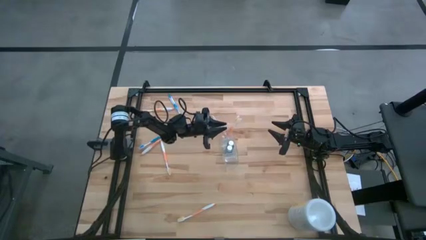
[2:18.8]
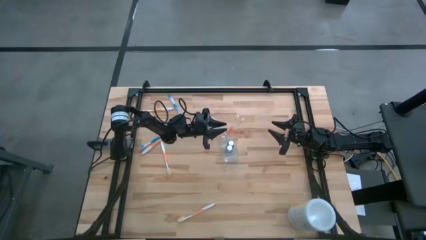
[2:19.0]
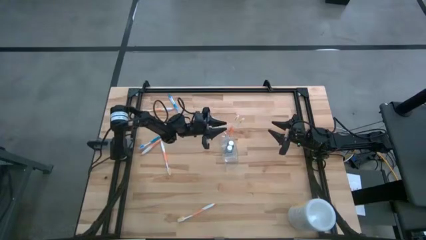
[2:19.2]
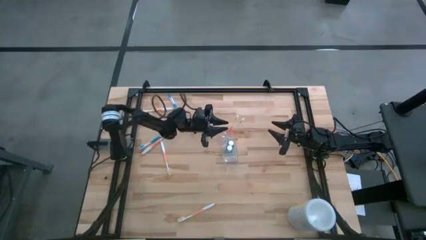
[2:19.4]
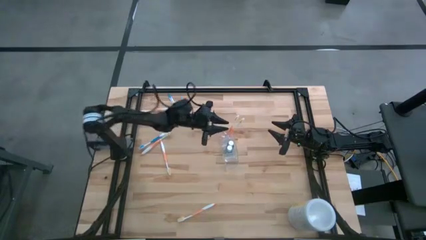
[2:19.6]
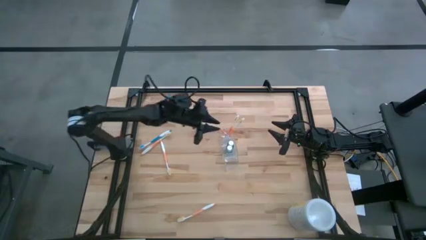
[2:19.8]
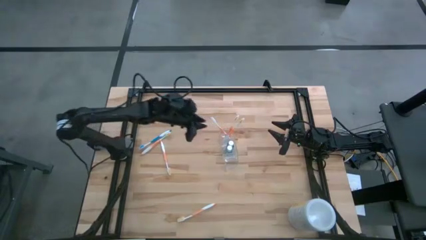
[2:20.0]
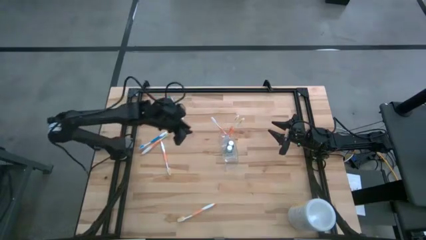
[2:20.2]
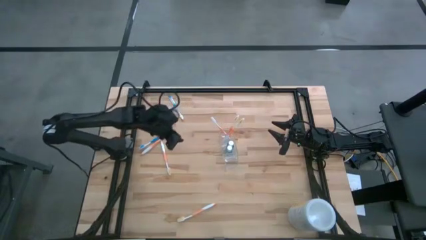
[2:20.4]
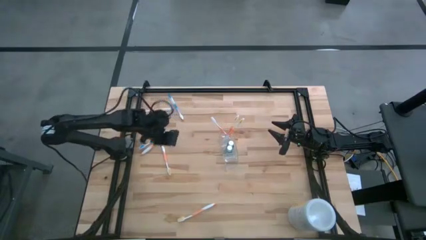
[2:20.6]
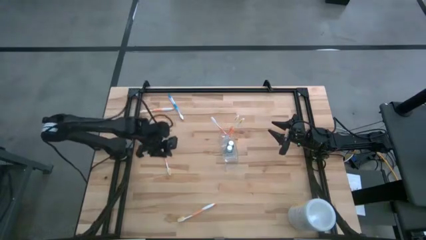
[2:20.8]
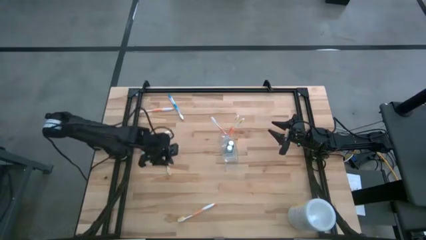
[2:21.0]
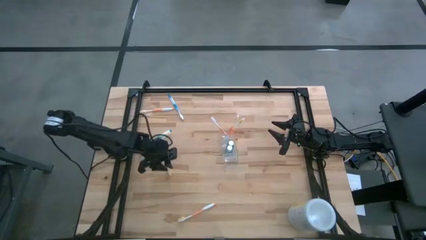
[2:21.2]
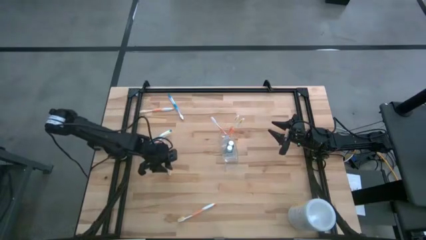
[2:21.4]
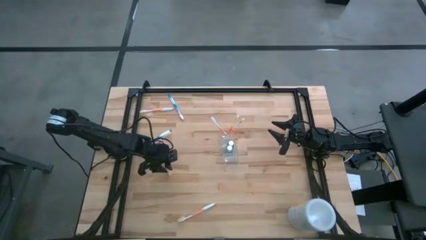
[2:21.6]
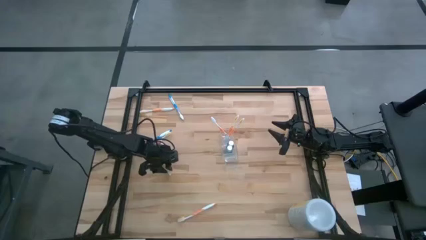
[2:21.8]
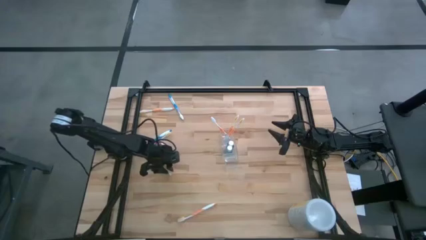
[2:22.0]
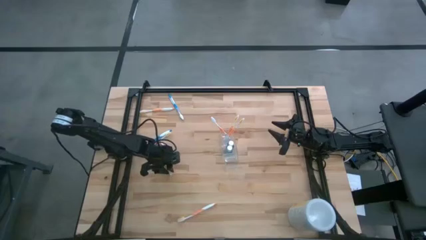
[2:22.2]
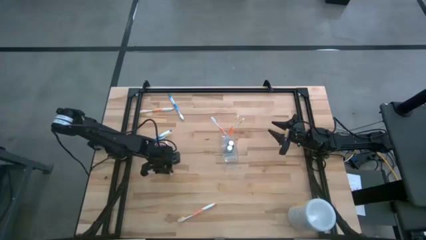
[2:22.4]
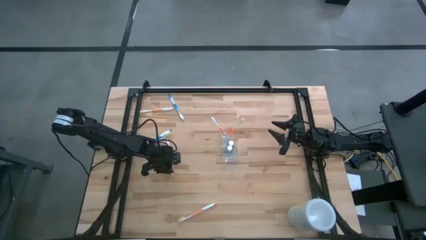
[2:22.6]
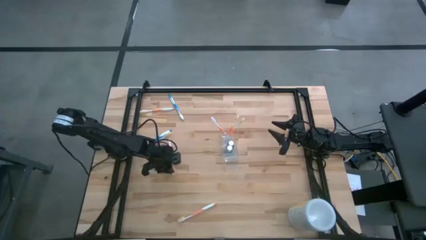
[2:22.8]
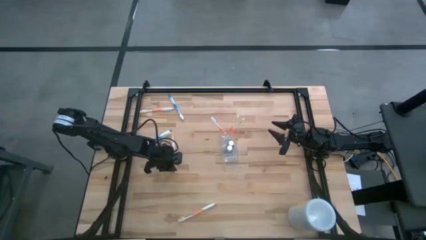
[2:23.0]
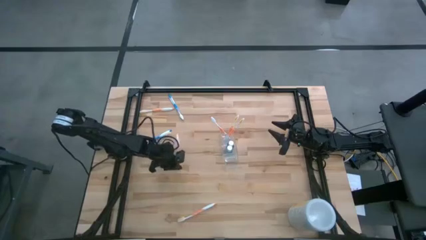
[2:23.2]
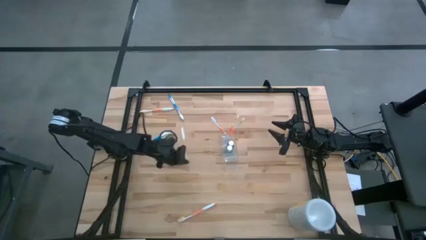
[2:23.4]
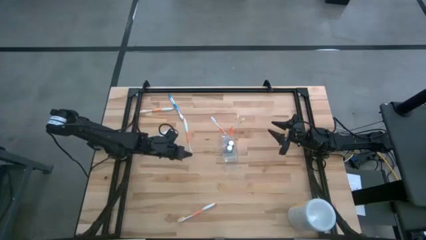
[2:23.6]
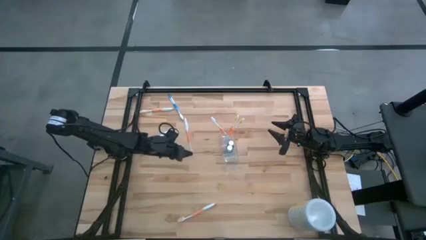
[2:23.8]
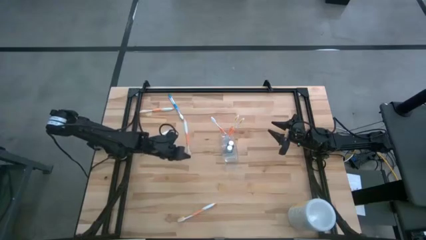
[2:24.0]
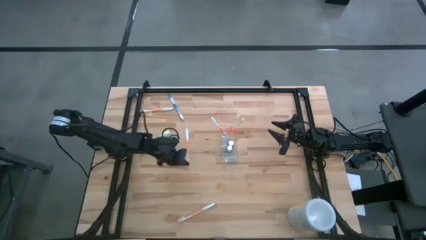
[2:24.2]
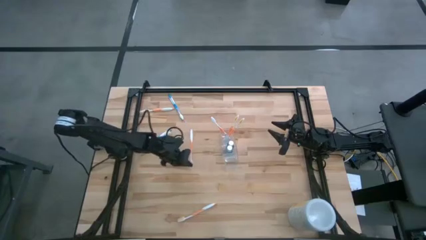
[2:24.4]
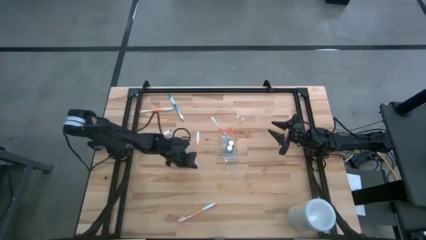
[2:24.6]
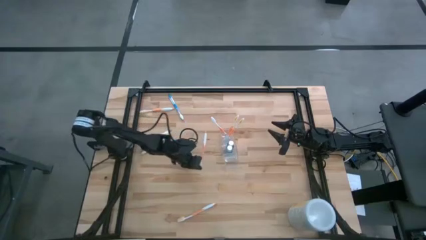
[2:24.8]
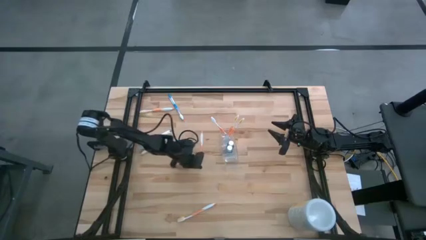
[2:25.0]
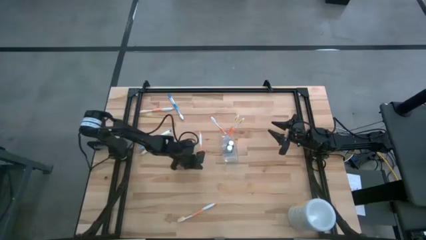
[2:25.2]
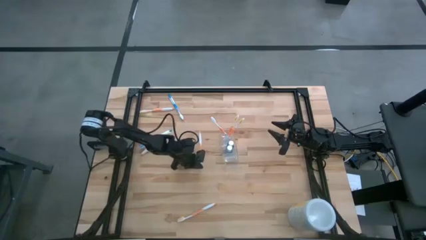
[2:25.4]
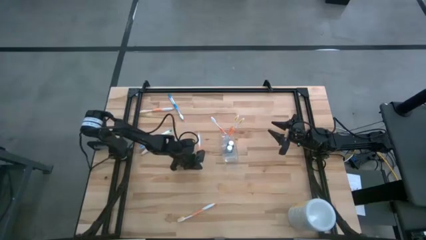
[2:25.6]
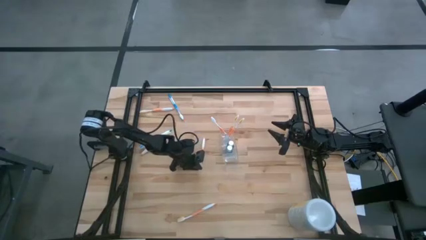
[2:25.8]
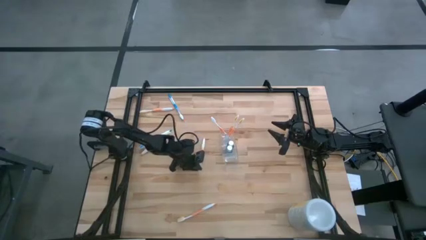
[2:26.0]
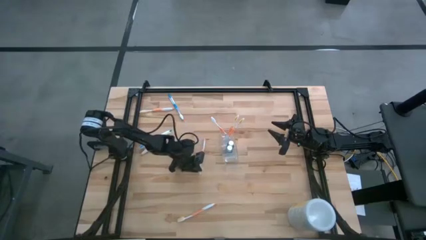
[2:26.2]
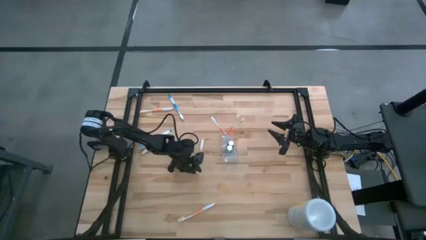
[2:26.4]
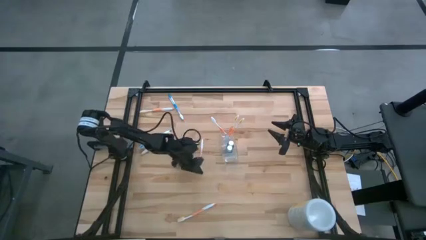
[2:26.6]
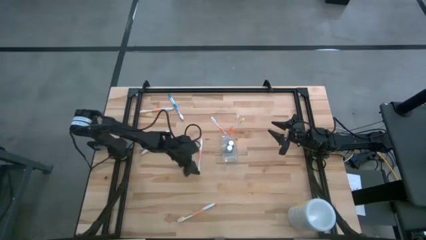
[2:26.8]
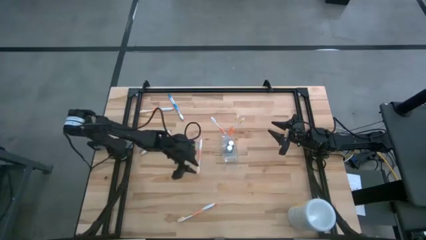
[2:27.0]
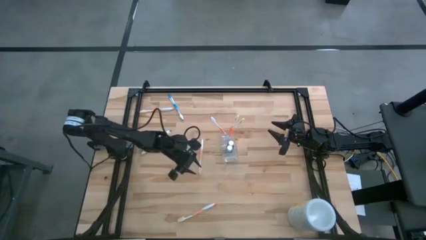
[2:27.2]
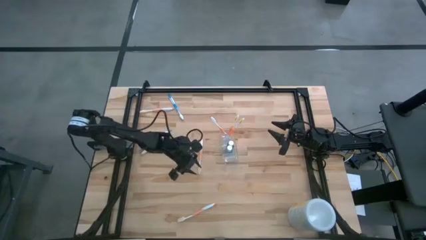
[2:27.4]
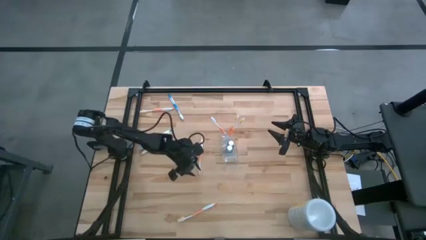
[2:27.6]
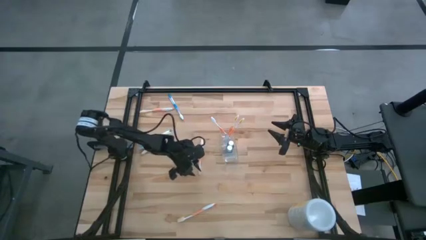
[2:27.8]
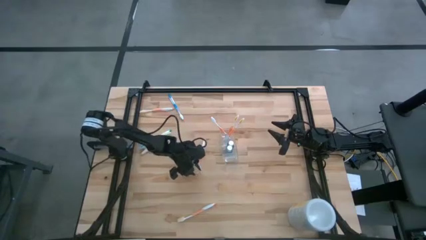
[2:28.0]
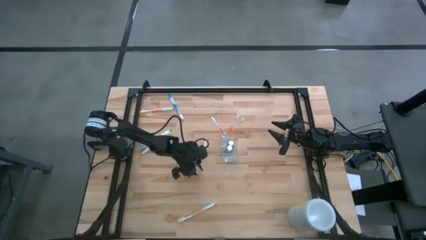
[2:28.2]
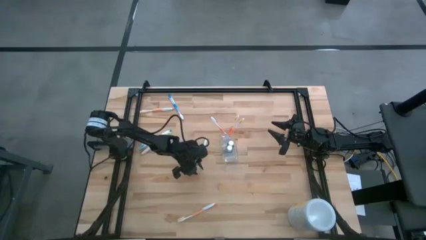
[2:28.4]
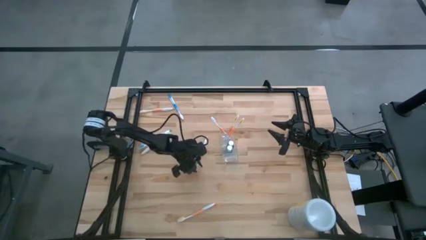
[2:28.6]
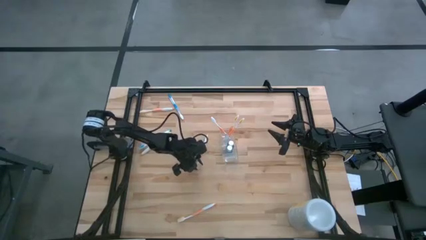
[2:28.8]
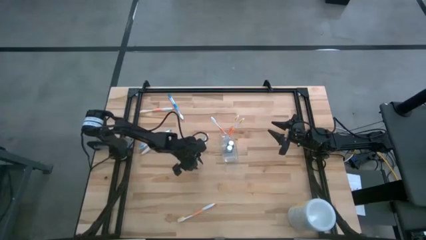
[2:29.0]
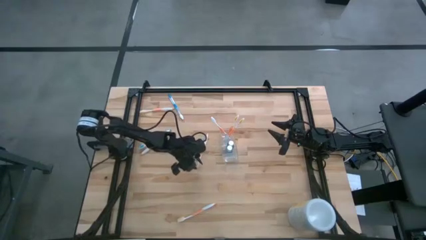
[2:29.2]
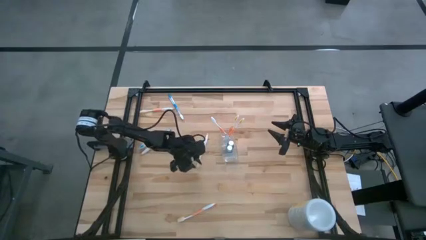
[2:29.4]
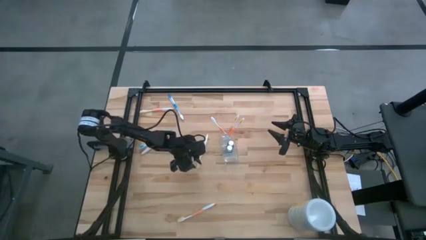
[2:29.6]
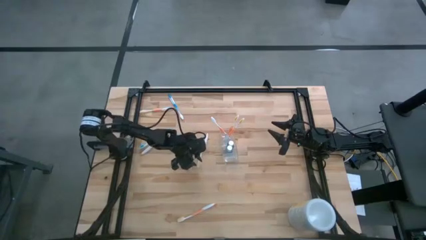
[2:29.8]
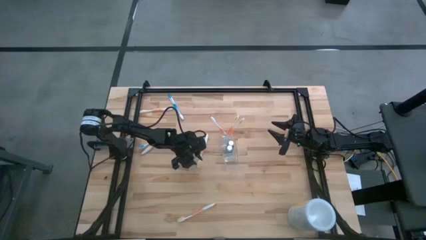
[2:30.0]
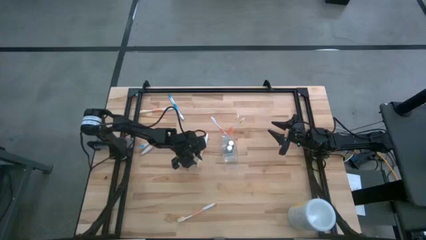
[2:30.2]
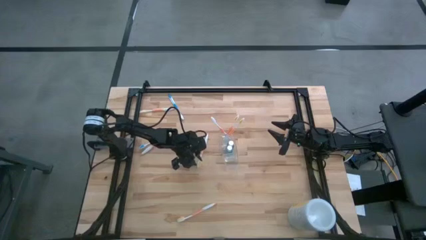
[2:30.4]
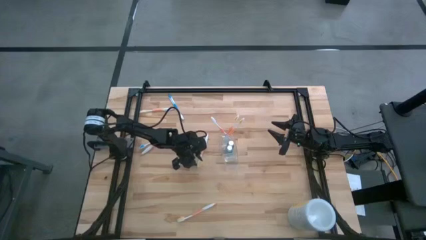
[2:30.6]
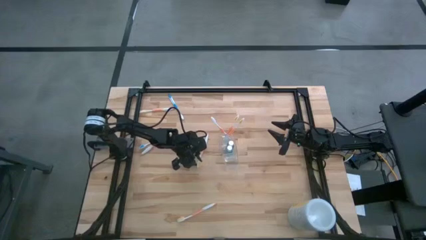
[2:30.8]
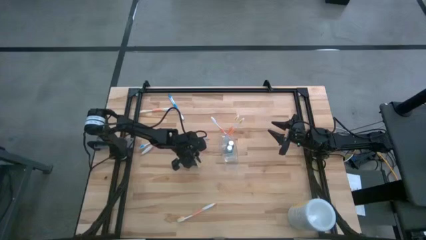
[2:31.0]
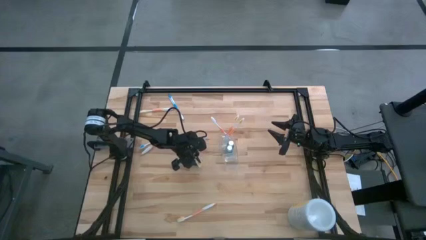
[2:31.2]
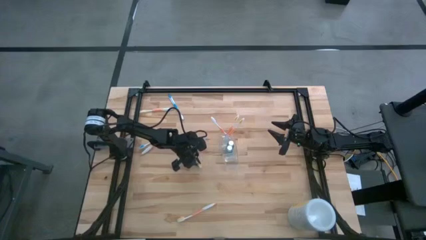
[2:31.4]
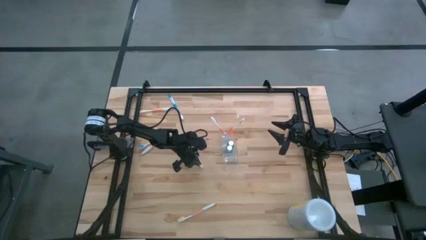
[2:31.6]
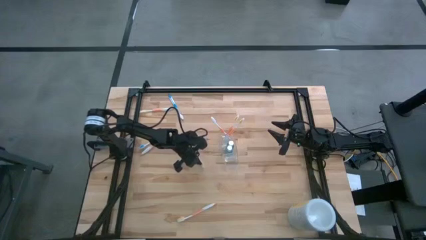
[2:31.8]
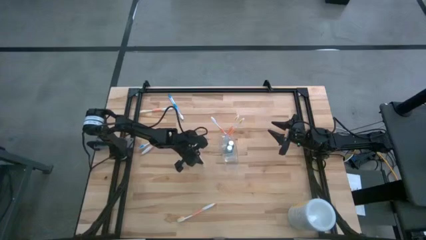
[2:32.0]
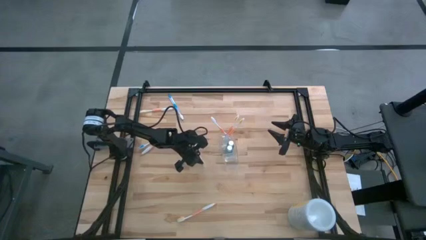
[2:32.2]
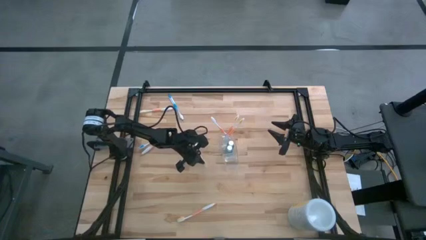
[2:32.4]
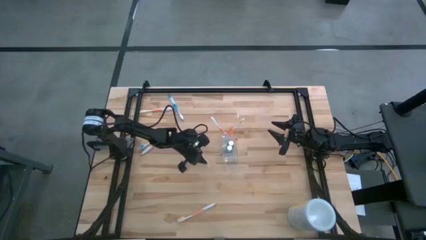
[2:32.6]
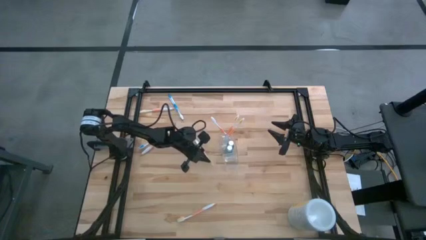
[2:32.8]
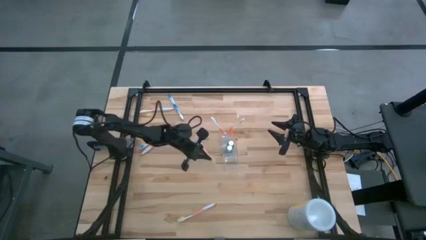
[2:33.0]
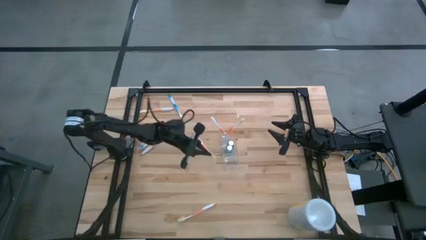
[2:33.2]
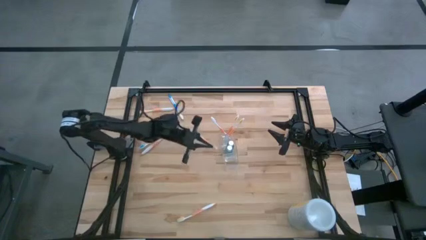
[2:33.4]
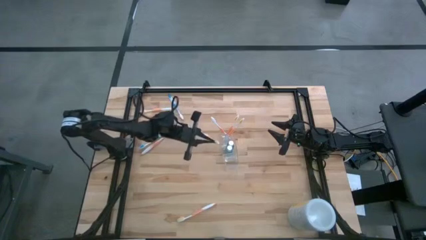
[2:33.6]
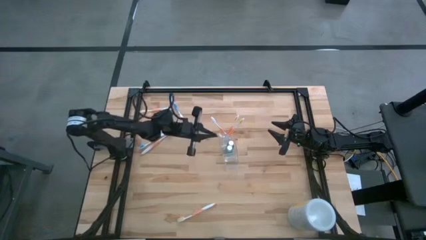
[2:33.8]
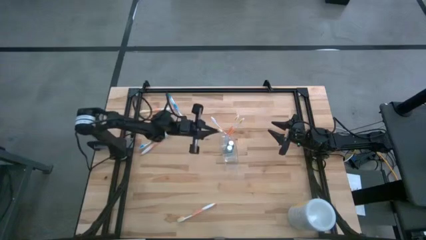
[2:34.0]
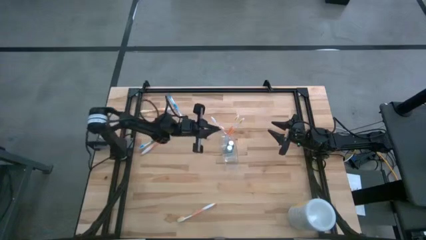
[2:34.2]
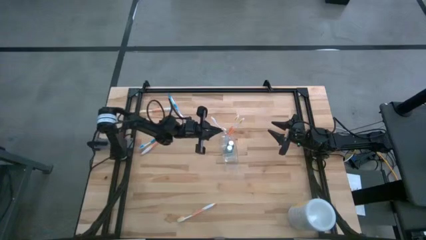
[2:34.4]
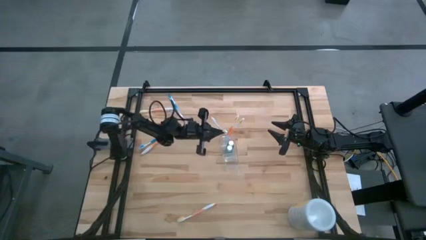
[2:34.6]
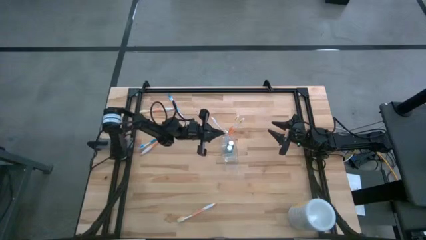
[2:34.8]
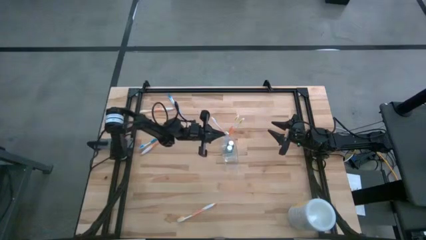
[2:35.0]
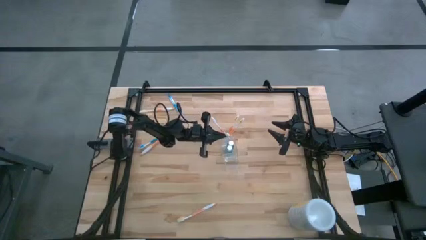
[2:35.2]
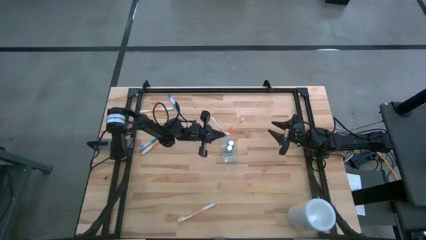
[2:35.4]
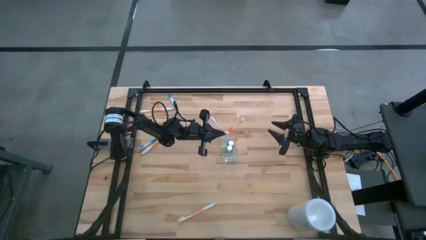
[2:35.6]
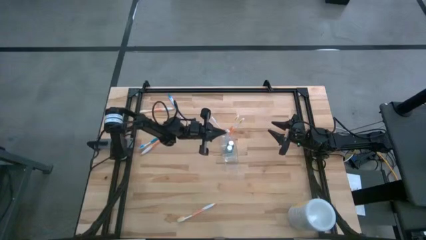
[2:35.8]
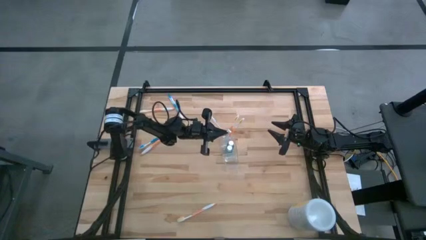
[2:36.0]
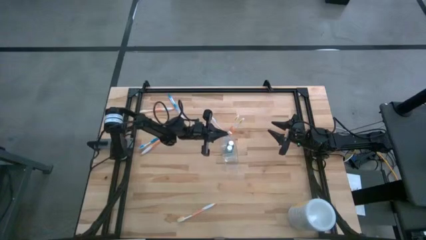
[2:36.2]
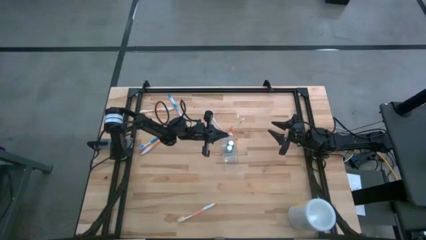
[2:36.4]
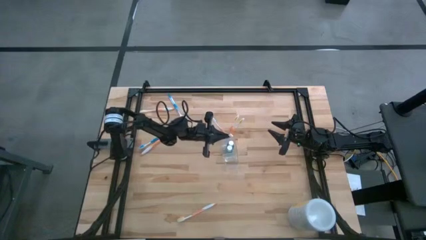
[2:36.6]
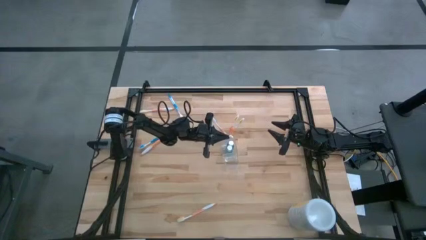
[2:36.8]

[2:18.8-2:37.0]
Task: Pick & Place toothbrushing station
Put the orange toothbrush into the transparent organizer
